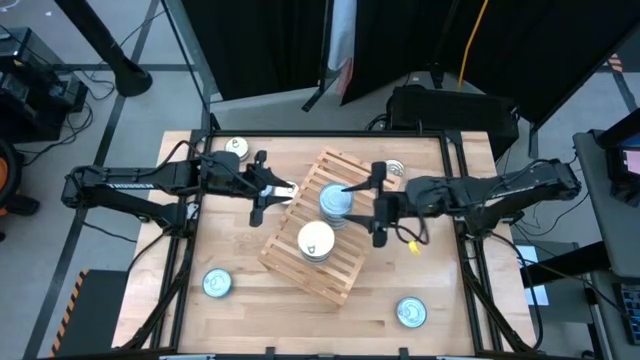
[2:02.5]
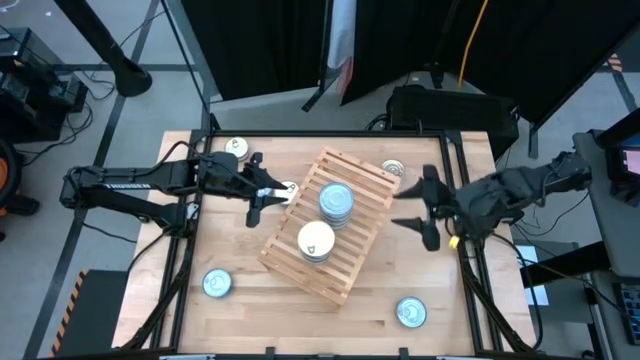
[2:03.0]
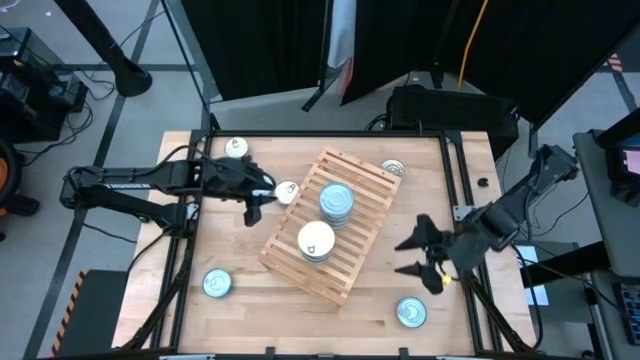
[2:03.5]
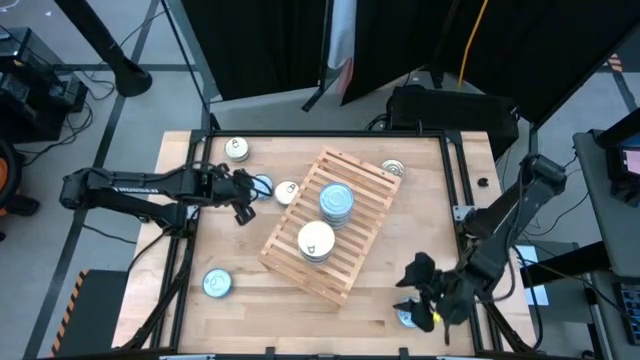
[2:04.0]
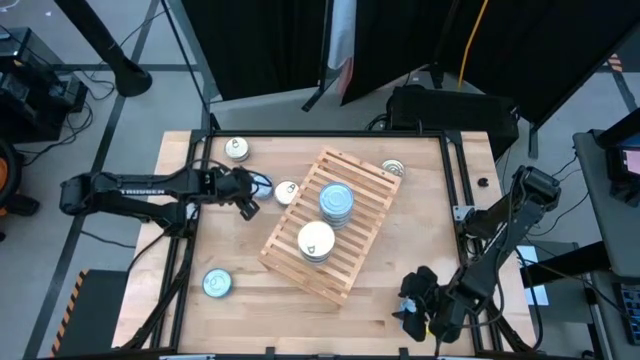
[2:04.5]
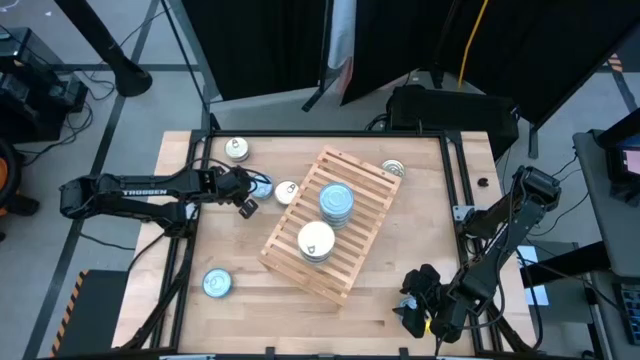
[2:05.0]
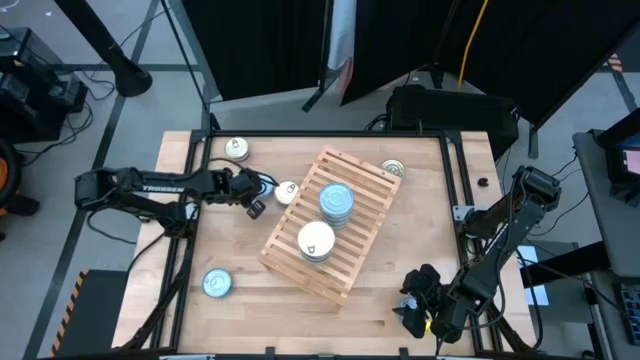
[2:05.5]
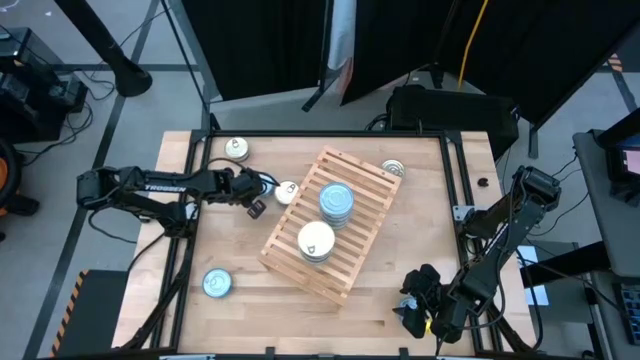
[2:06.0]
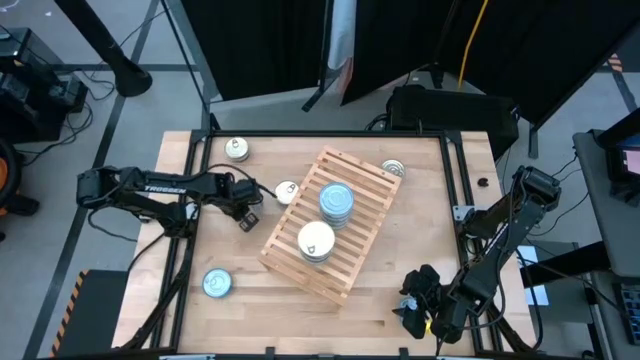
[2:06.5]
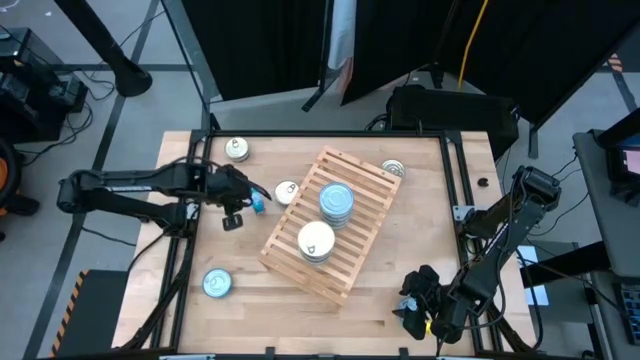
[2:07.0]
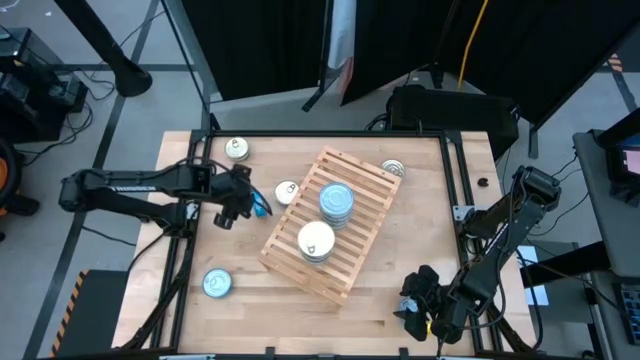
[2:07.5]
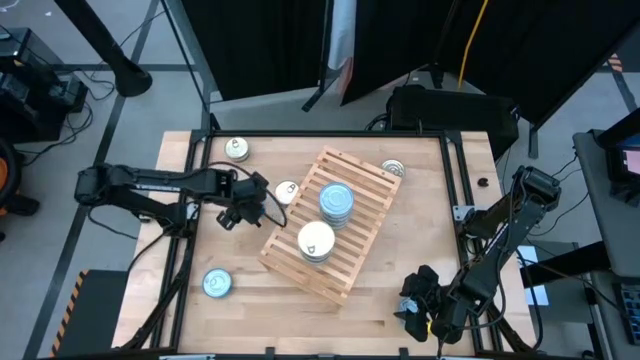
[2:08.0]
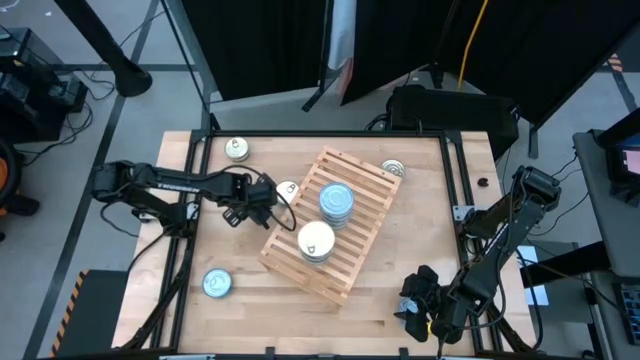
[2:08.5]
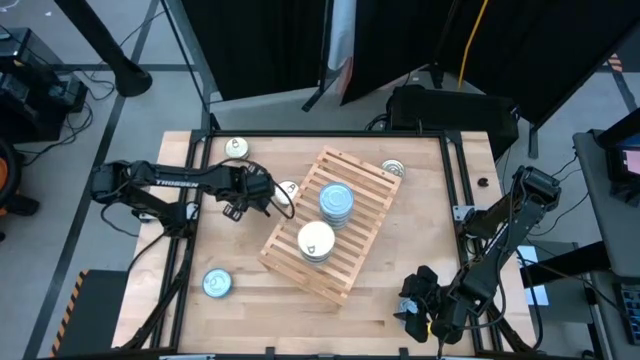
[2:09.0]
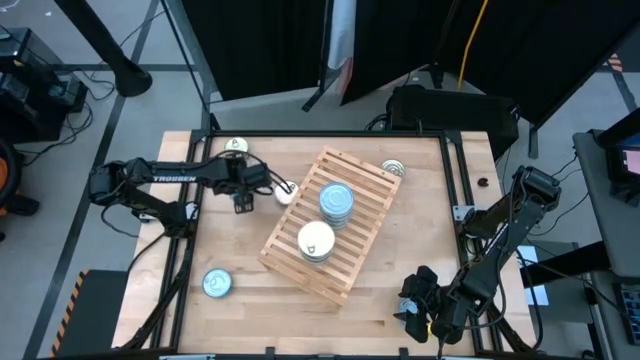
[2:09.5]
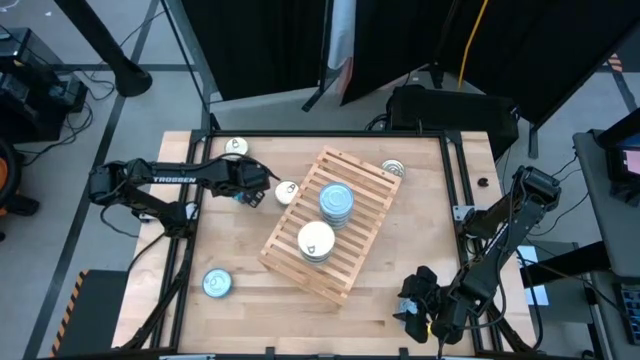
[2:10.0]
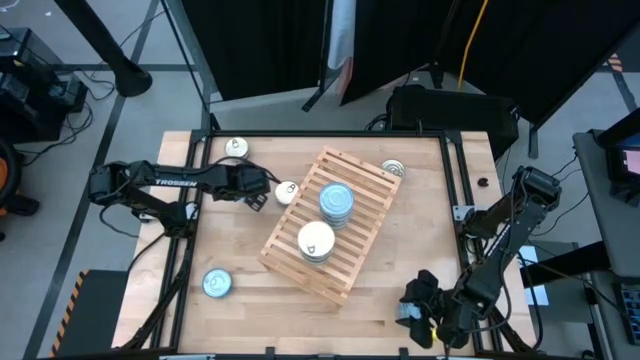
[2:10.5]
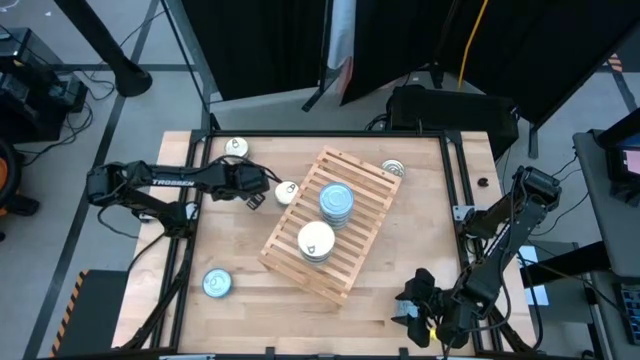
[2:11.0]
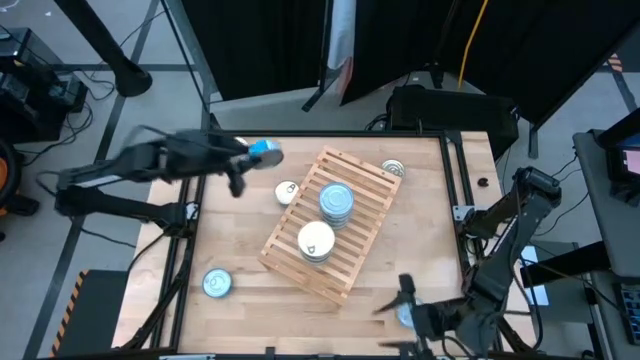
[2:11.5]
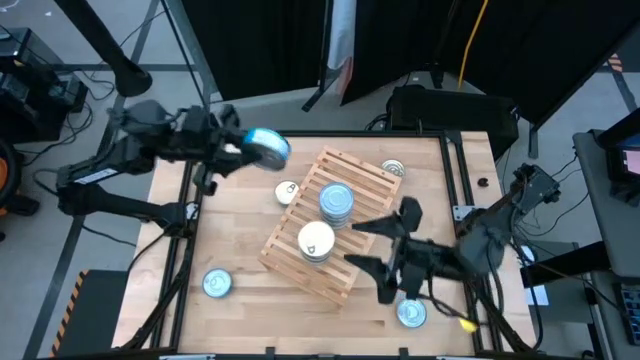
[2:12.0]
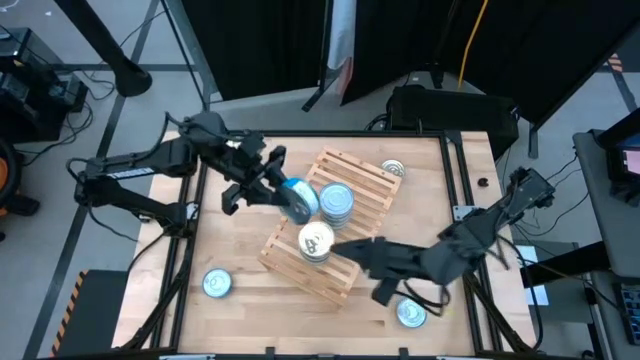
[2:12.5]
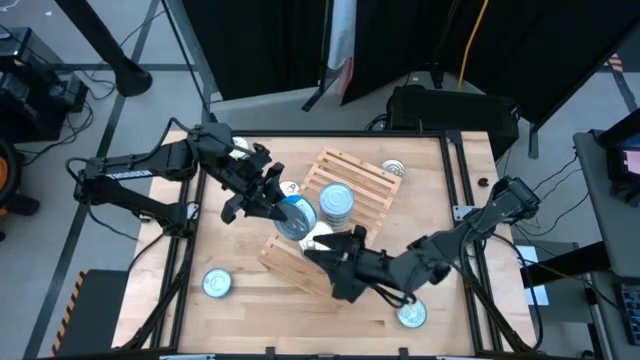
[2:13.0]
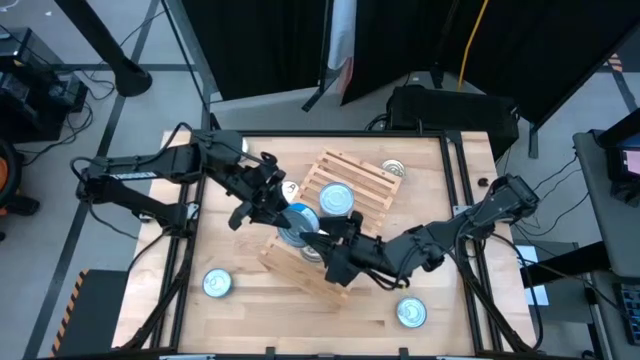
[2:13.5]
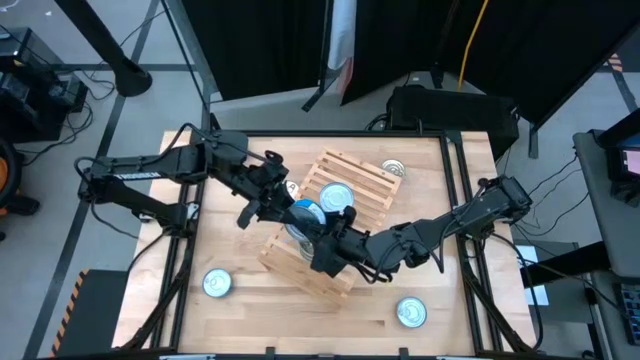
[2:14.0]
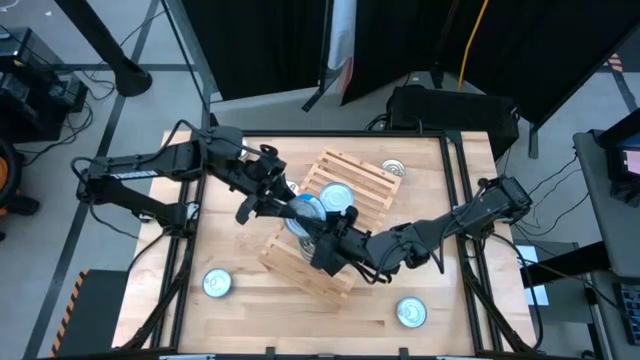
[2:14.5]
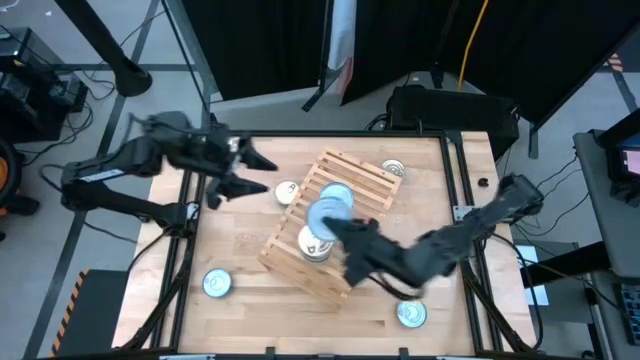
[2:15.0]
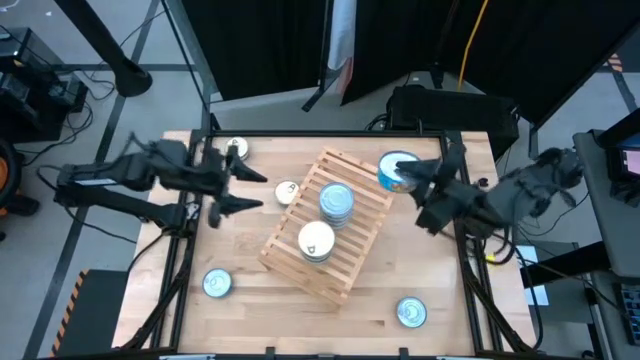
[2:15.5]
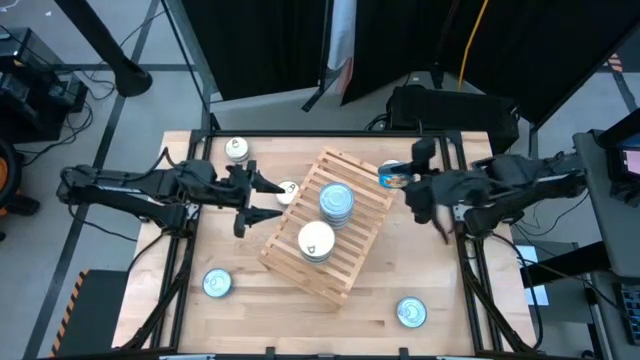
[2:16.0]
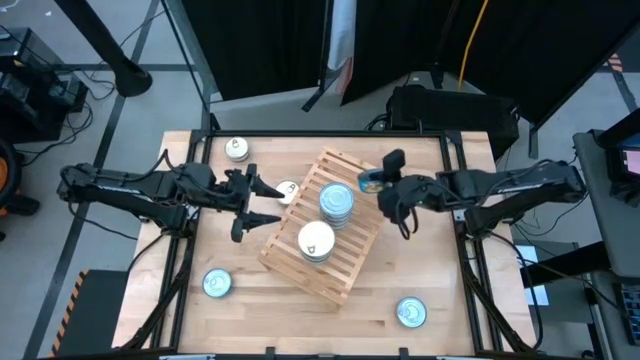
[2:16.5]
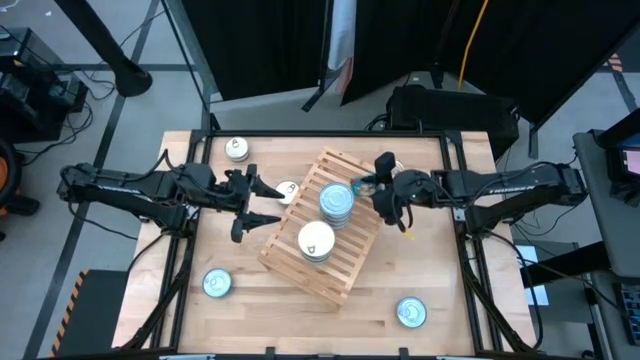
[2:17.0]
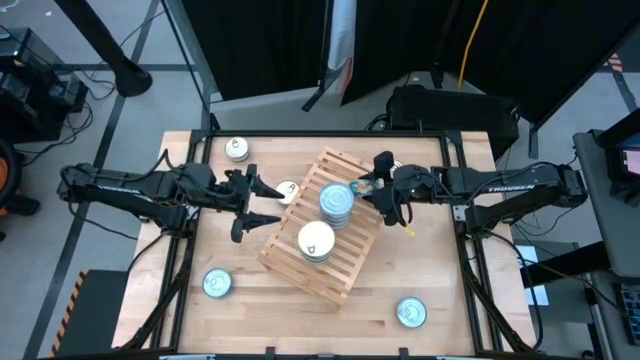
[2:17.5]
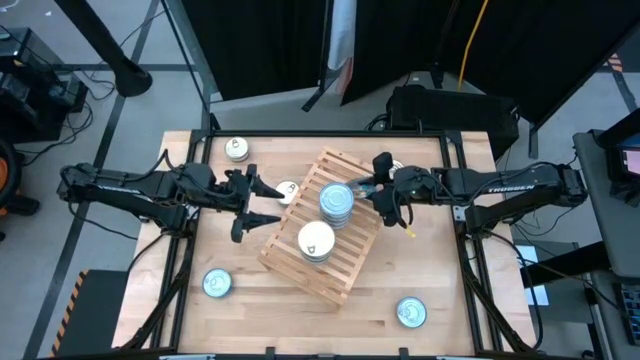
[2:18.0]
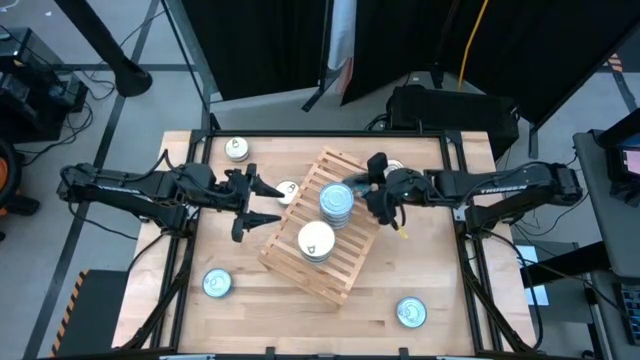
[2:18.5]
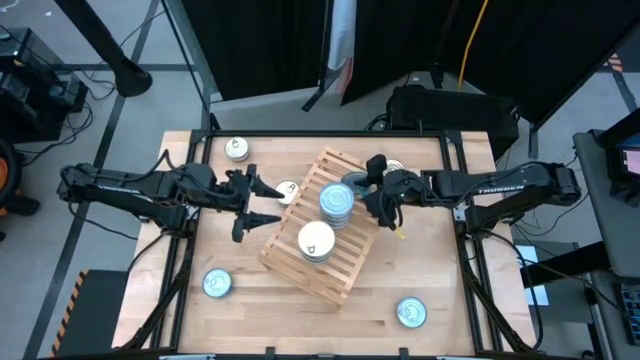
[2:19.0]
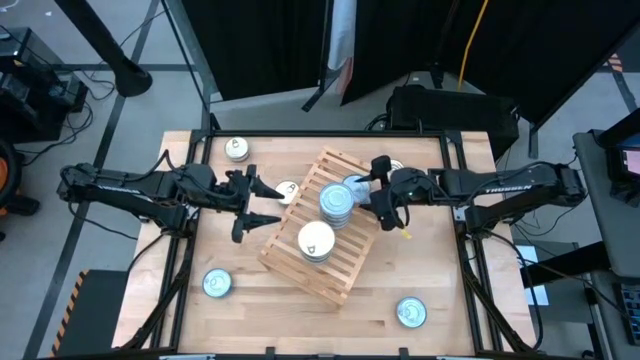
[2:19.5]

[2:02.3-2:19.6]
Task: Stack canned seafood by type on shelf
Put the yellow-blue tuna can on the shelf

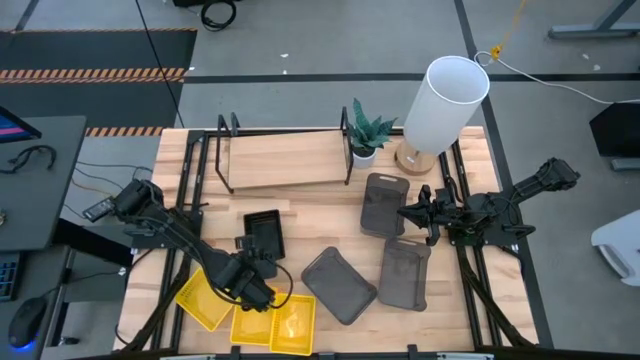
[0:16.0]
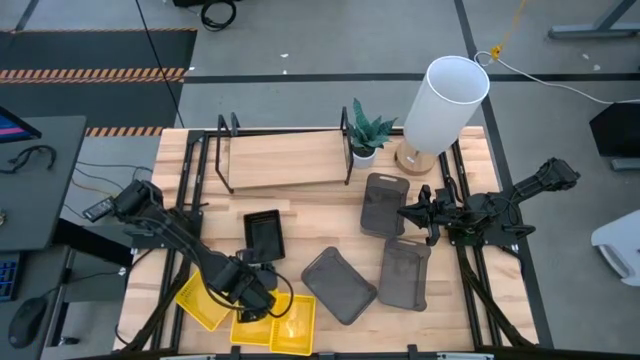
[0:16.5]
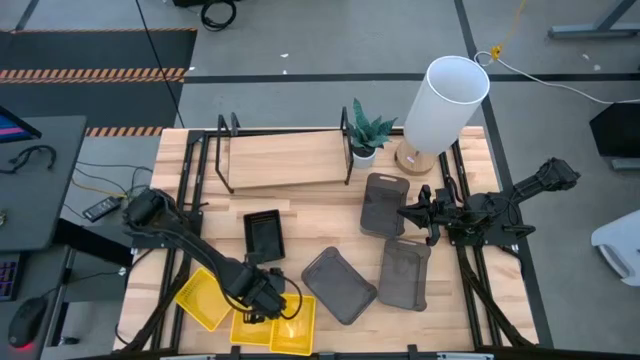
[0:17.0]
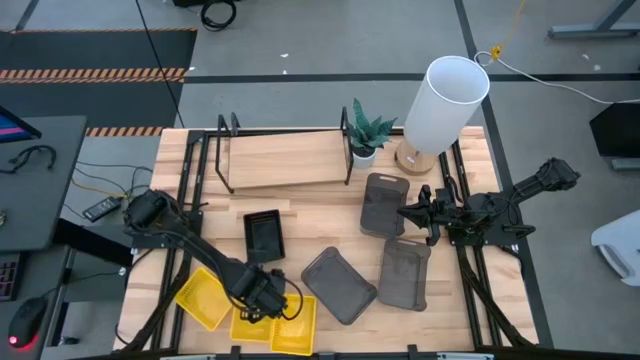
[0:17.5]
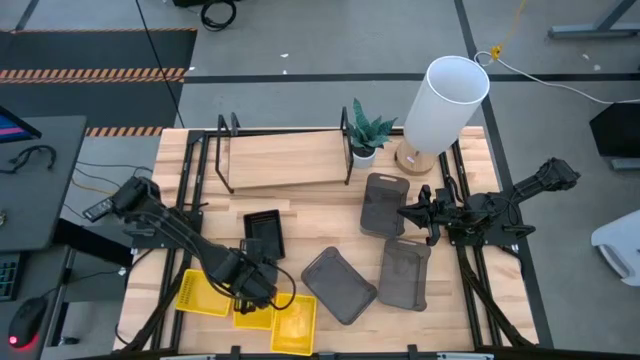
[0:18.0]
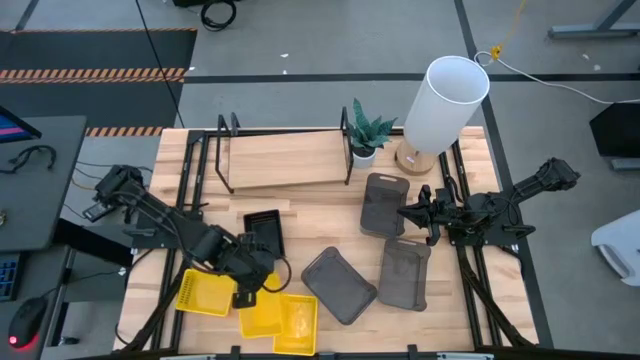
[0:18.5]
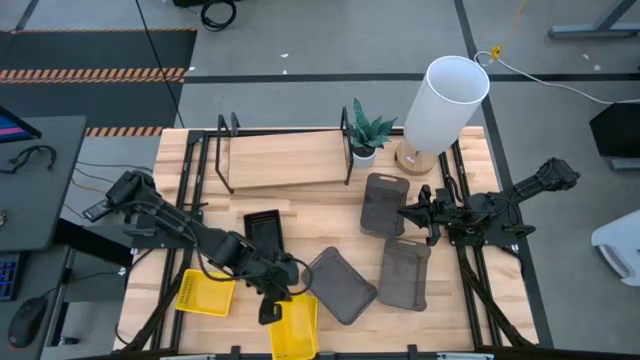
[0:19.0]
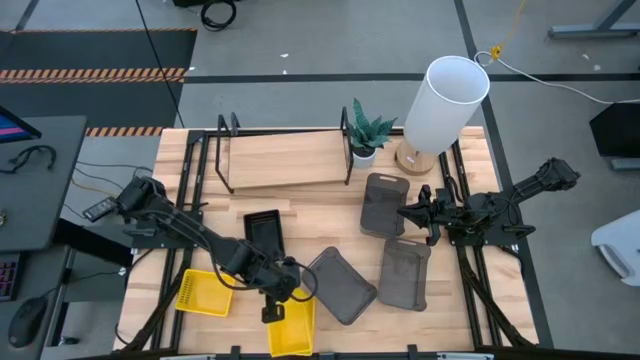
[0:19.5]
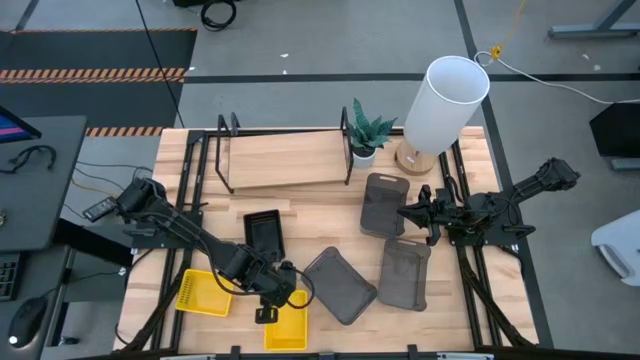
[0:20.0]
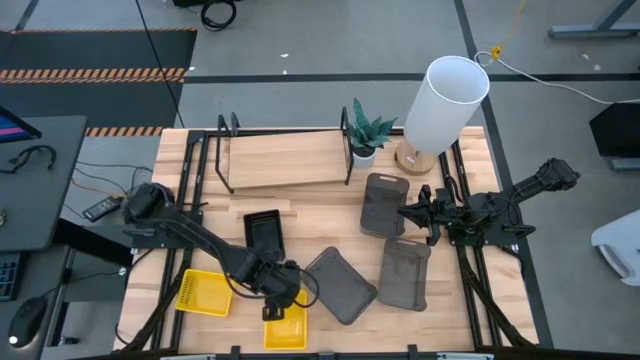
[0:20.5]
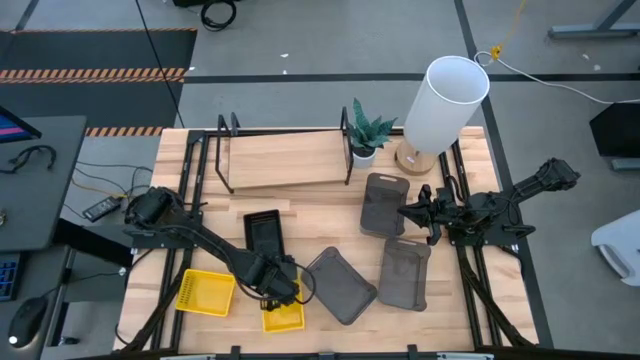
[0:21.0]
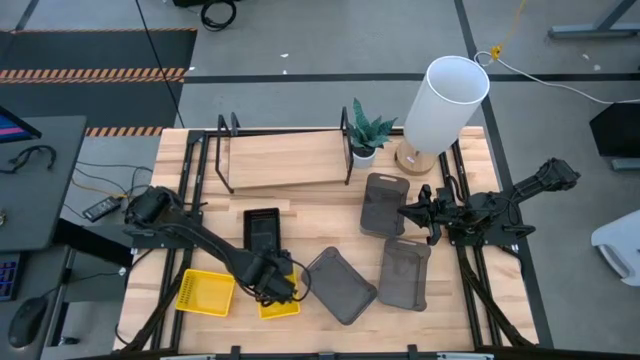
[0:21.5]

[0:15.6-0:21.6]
Task: Stack baskets on shelf by color
Stack the middle yellow bin on top of the right yellow bin
